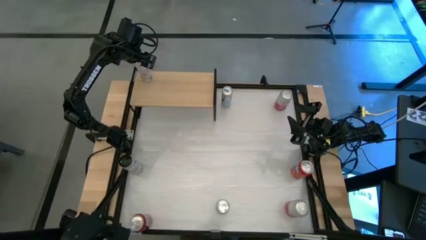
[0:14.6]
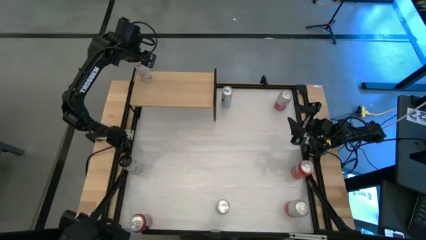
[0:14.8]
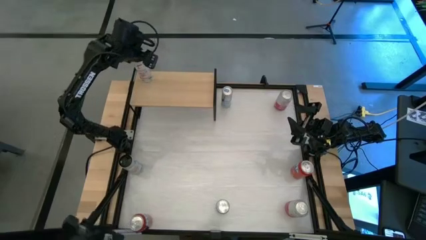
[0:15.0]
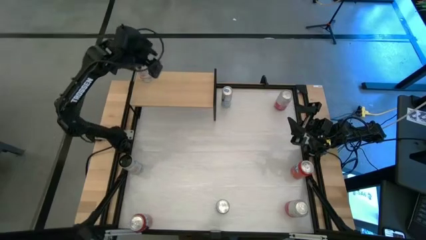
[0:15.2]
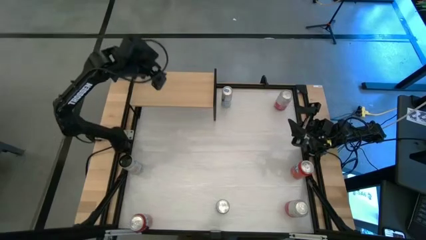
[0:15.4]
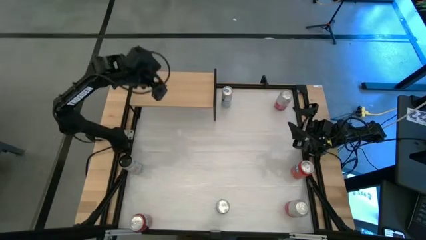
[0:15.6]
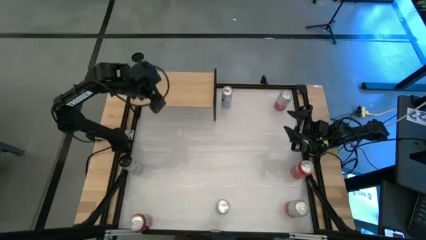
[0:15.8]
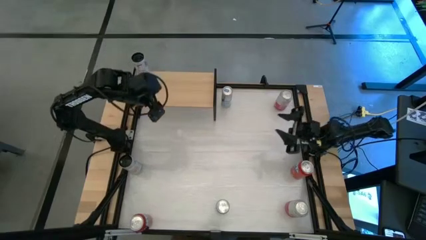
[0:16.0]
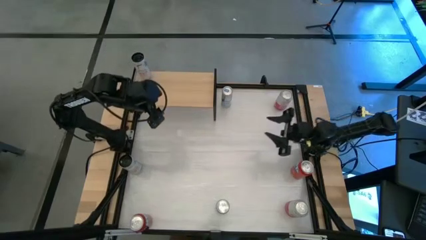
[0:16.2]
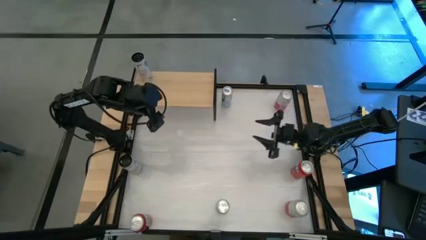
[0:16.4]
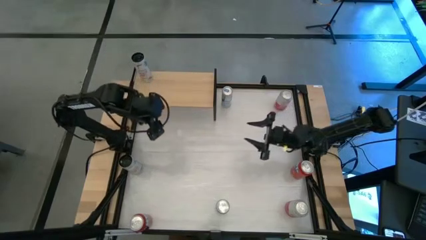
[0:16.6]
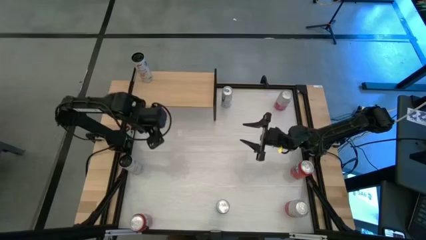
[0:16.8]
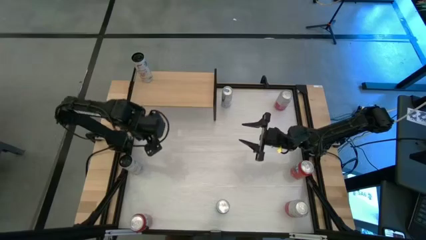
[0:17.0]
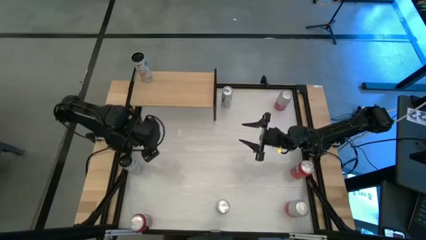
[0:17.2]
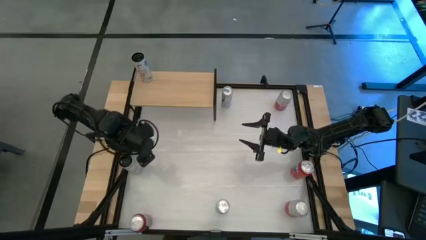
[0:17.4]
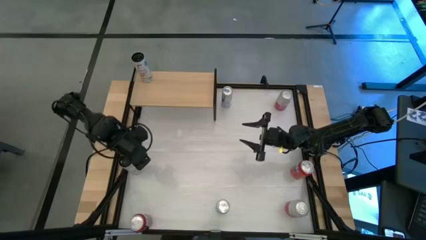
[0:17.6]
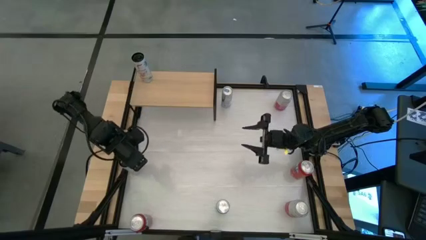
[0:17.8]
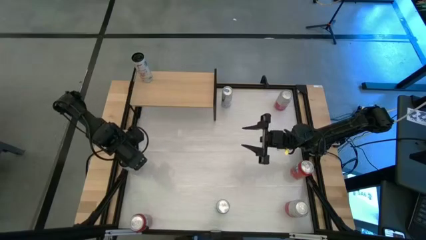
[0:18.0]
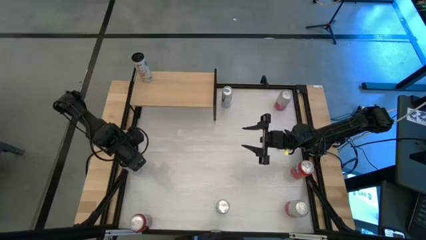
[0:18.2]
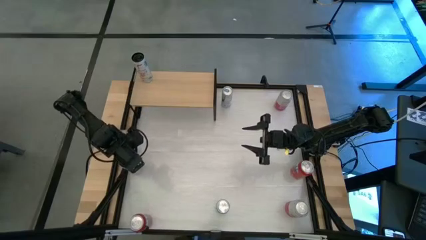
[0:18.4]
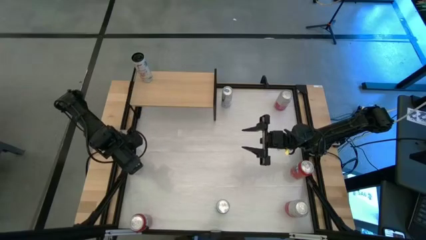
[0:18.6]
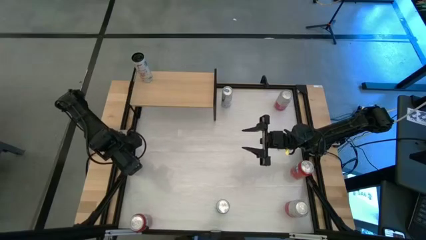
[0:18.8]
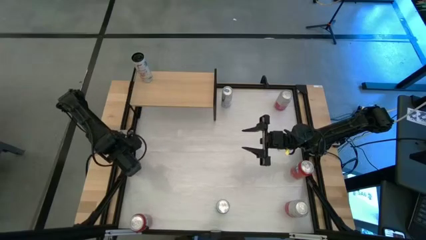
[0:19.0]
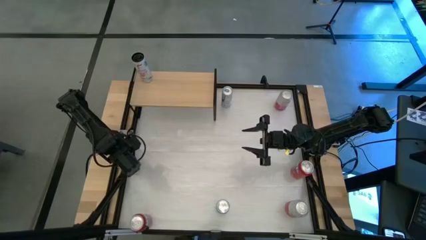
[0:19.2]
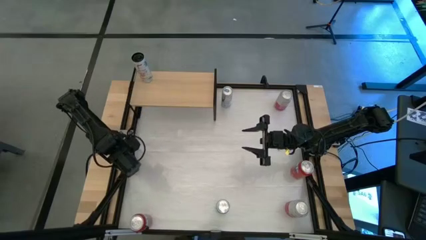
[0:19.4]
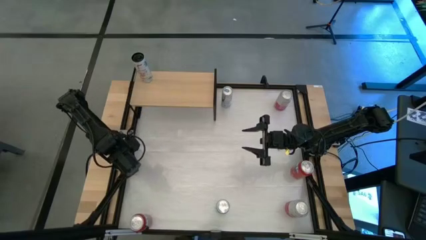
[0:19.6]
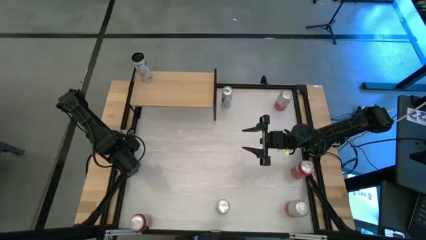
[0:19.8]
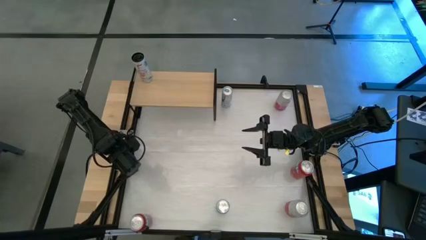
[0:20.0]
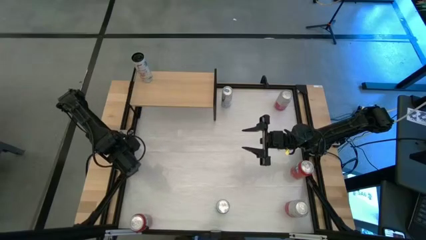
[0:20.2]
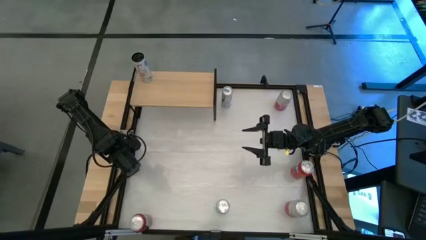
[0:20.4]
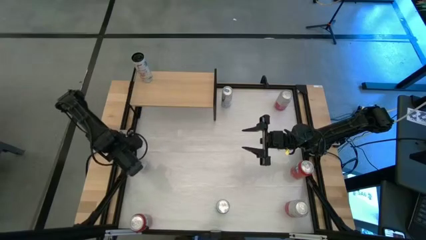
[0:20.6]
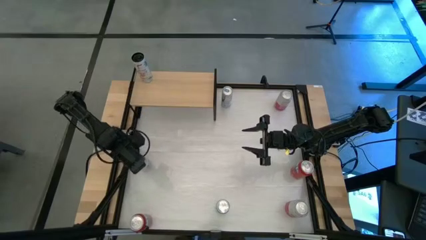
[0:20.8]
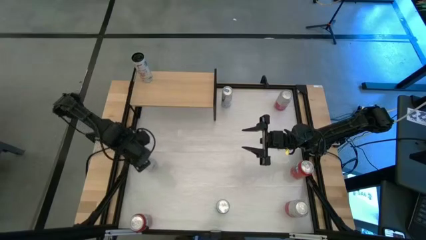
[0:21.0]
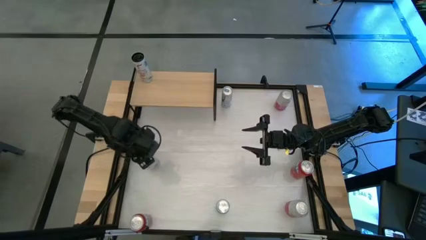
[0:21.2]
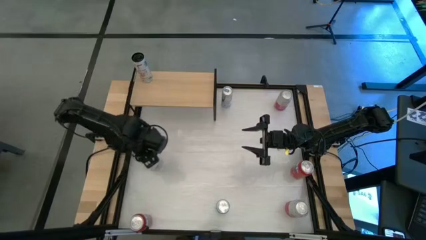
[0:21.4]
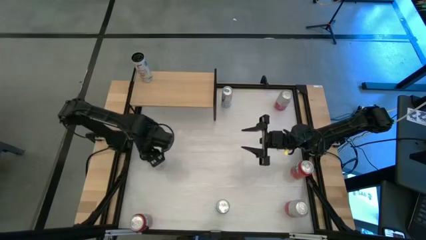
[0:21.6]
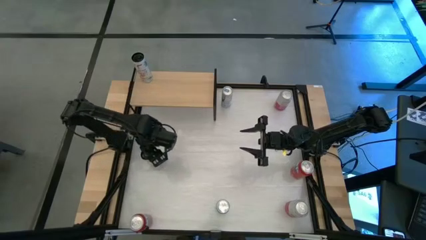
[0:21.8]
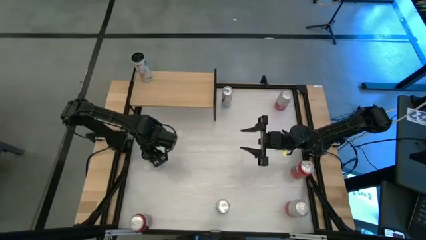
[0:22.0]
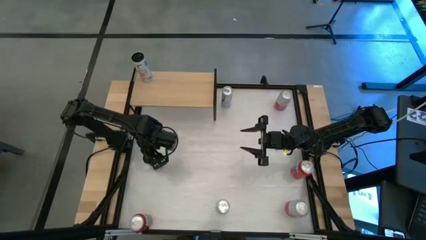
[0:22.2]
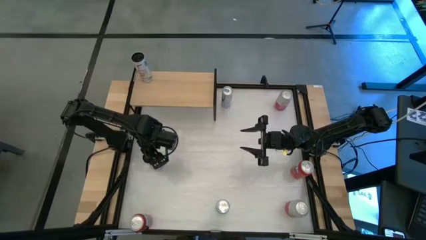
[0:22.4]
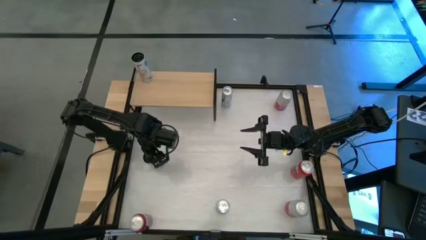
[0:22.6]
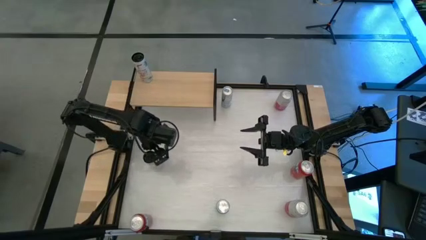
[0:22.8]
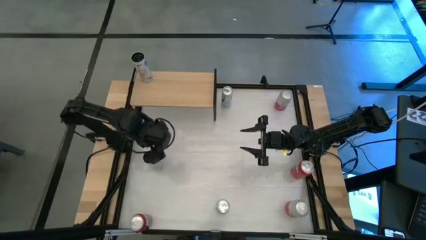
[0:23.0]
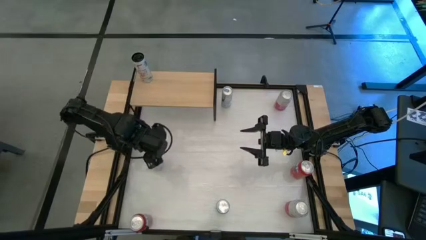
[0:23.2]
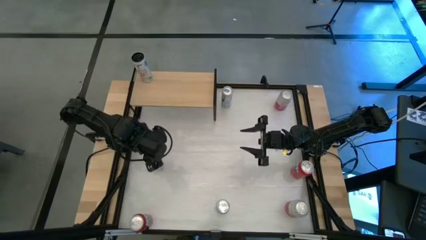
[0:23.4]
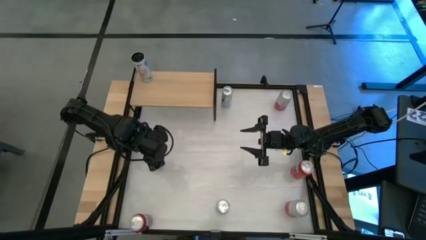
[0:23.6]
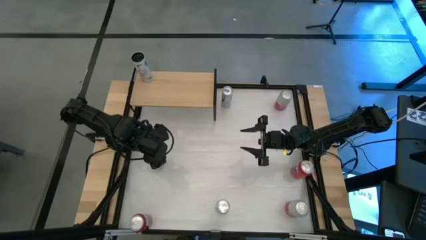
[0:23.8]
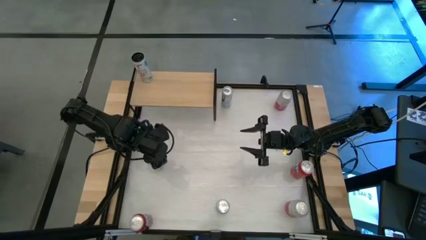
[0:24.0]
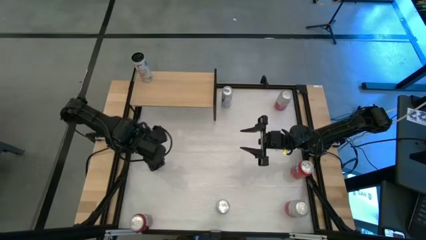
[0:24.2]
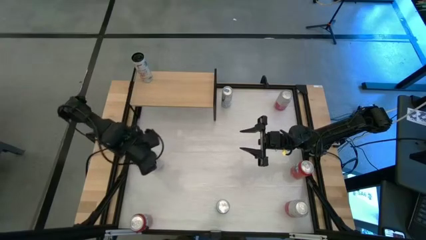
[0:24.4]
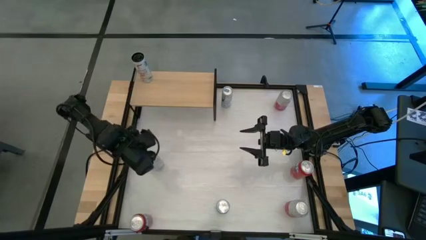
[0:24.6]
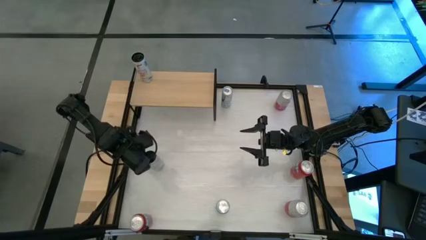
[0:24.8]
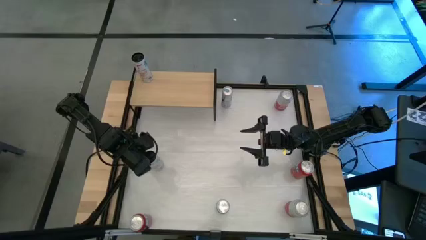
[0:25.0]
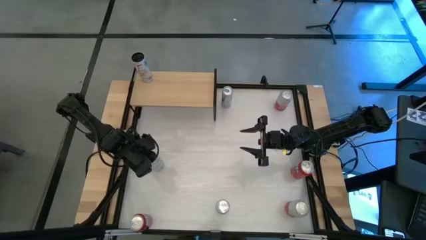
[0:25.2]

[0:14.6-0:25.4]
Task: Place canned beverage on shelf
Put the white pink soda can on the shelf aligned with the white pink soda can

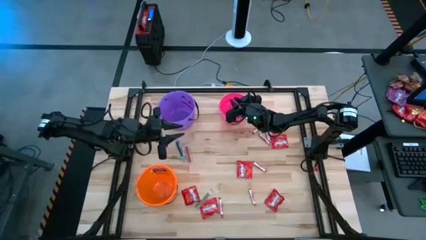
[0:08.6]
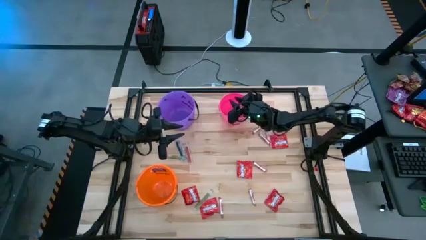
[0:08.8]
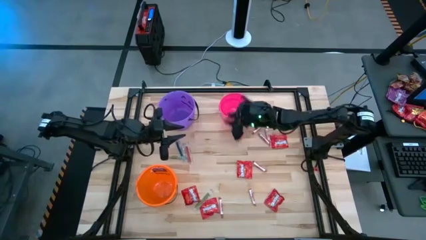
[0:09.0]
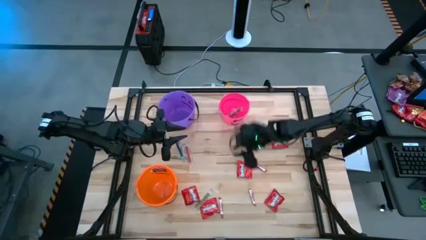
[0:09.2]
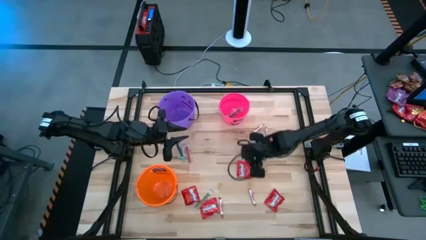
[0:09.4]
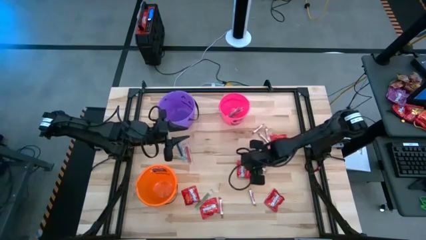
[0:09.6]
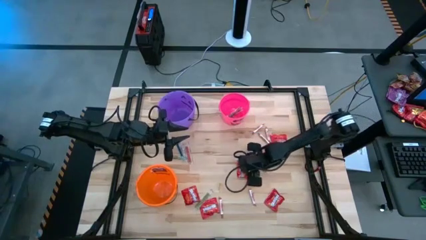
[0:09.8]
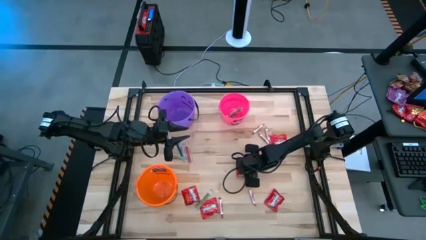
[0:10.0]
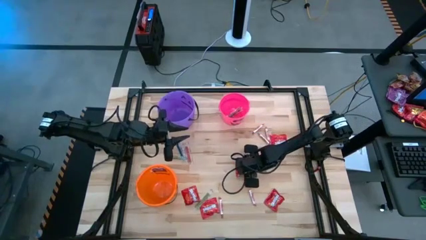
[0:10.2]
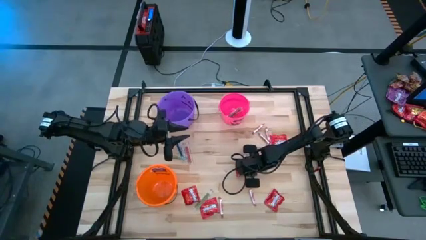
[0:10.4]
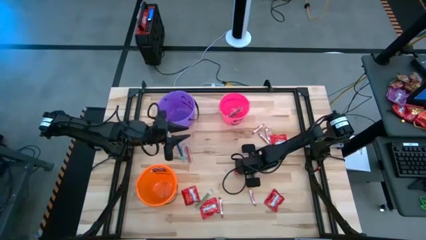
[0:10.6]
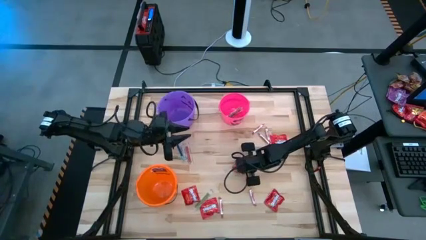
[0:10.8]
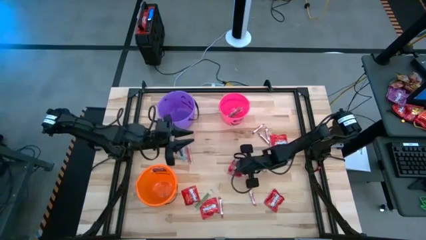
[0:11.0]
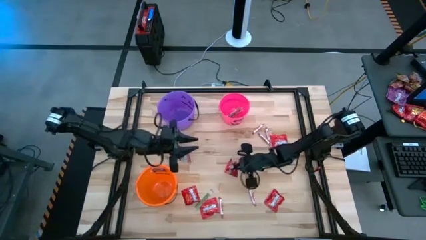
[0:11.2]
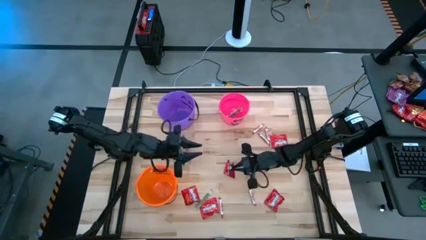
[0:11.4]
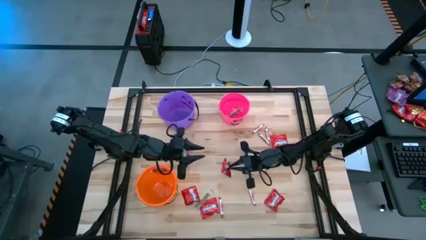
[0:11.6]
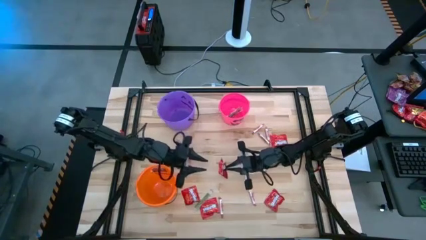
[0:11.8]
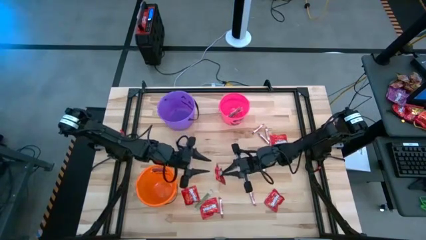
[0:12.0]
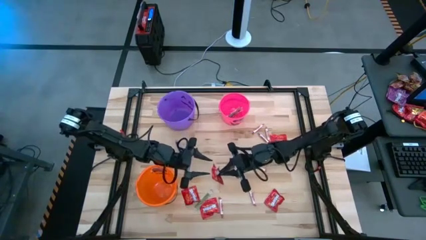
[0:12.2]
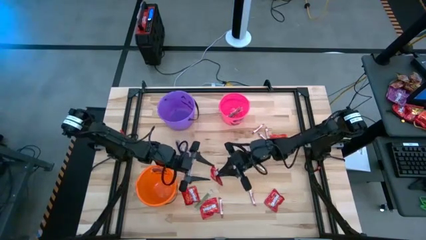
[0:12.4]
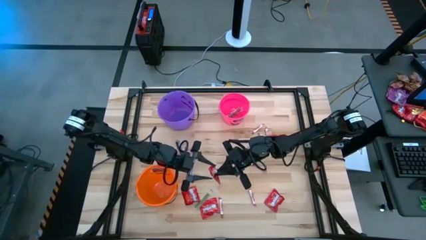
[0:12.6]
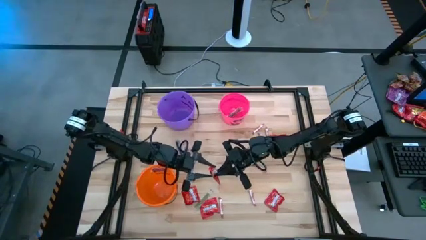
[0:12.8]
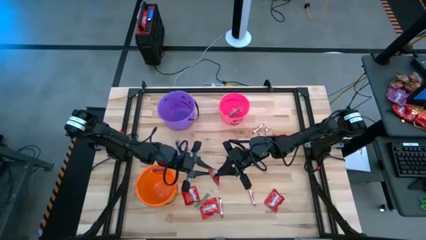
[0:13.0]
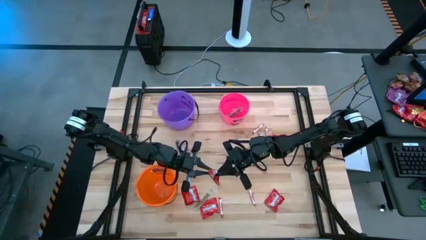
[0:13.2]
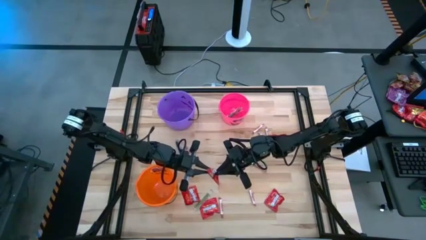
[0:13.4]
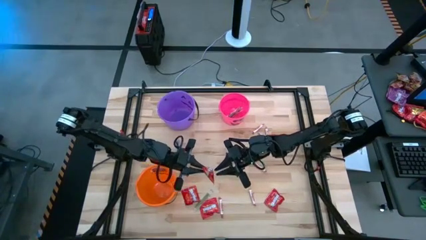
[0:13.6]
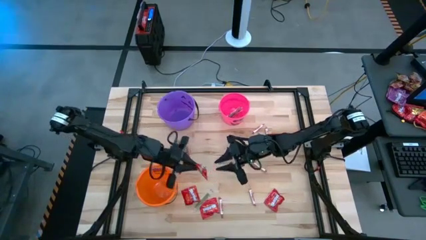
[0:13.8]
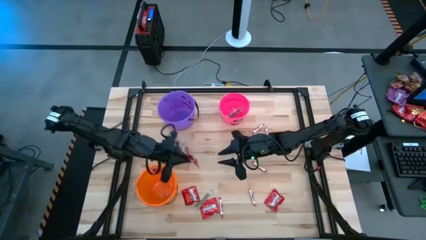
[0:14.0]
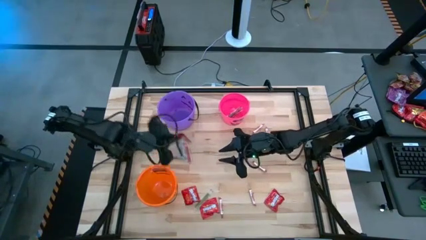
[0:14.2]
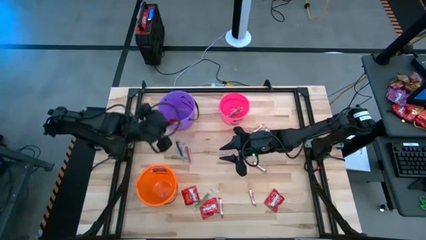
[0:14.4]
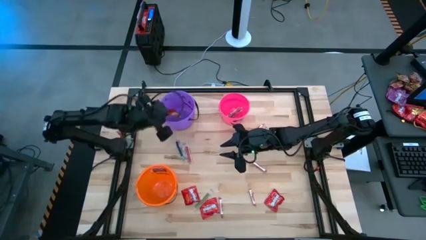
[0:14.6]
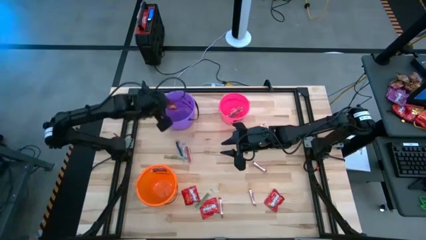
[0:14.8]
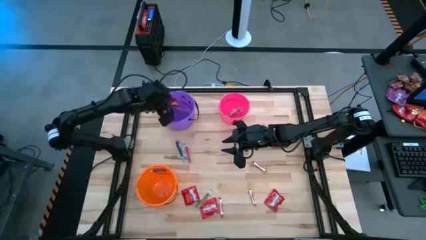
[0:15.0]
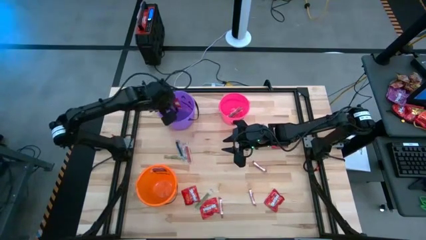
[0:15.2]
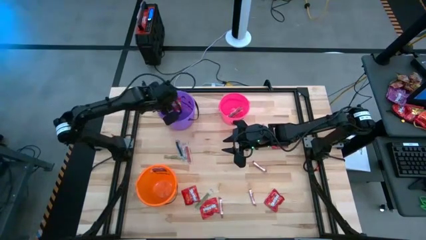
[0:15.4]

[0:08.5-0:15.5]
Task: Sort candy by brand, put in halloween buckets
Put the red candy into the purple bucket
